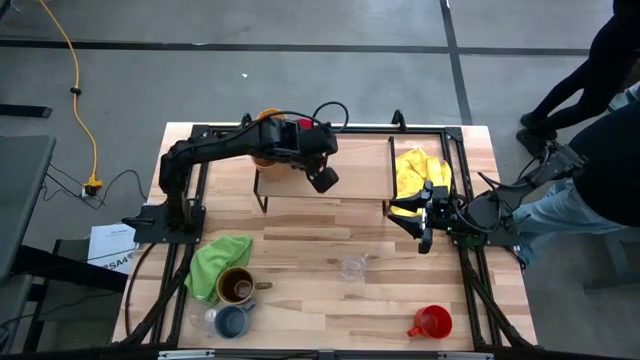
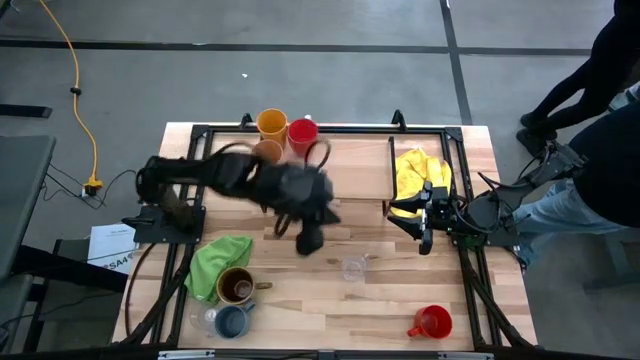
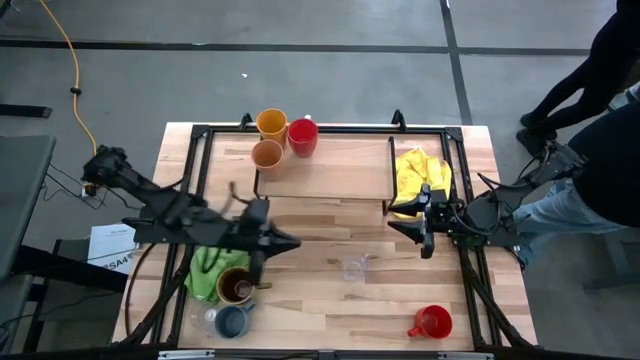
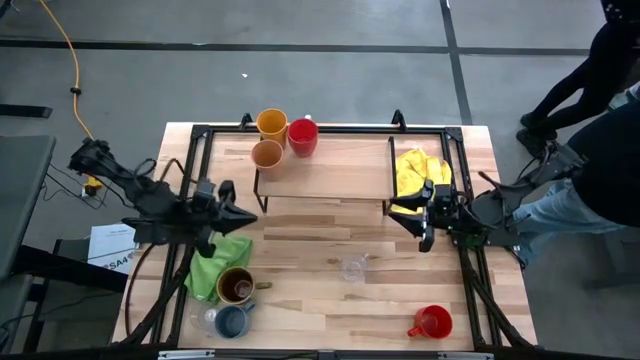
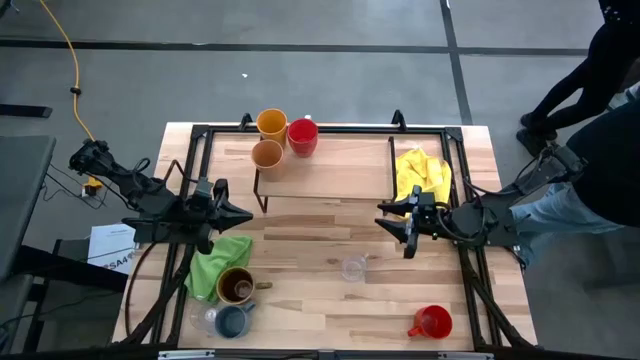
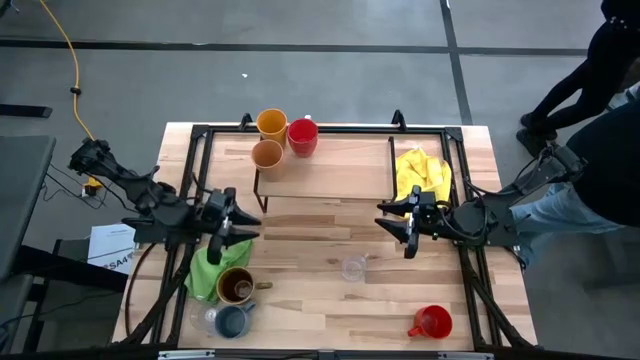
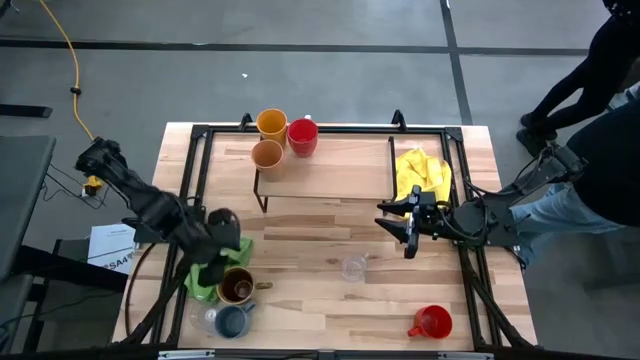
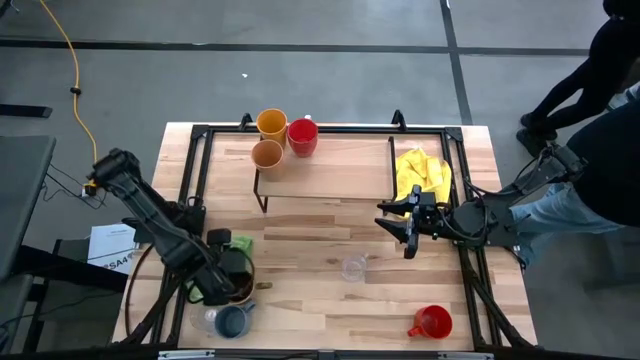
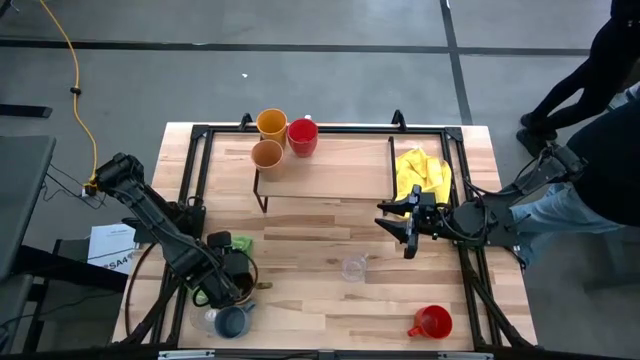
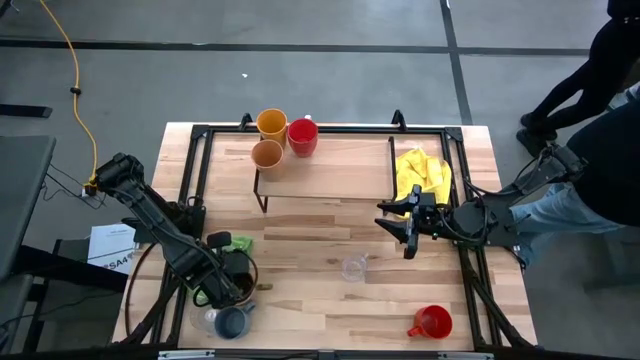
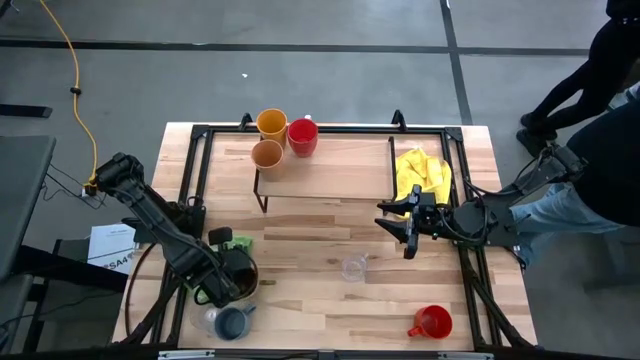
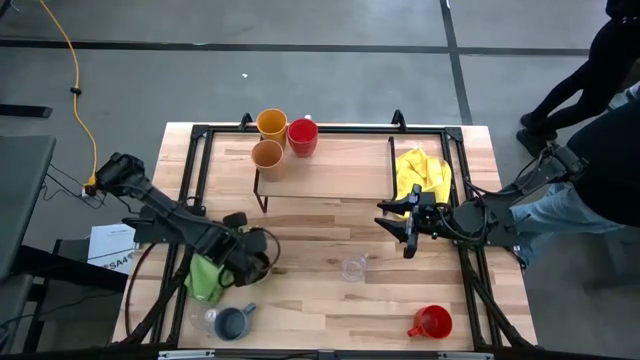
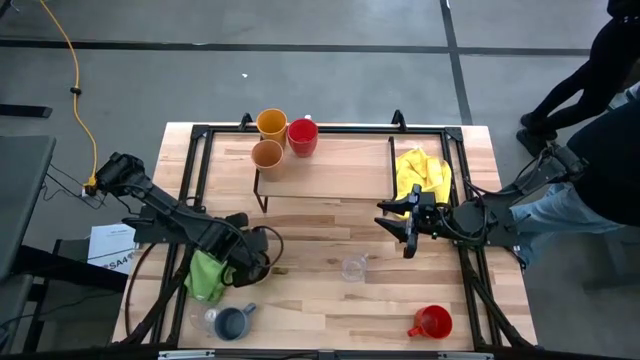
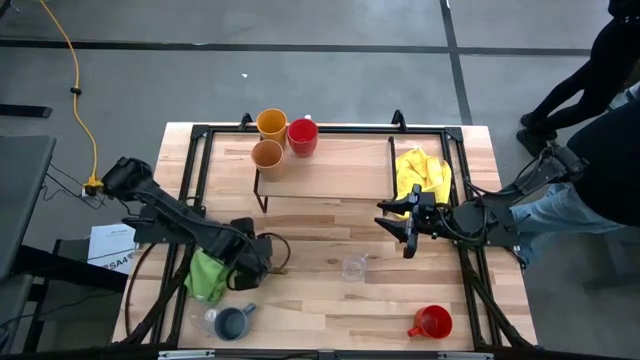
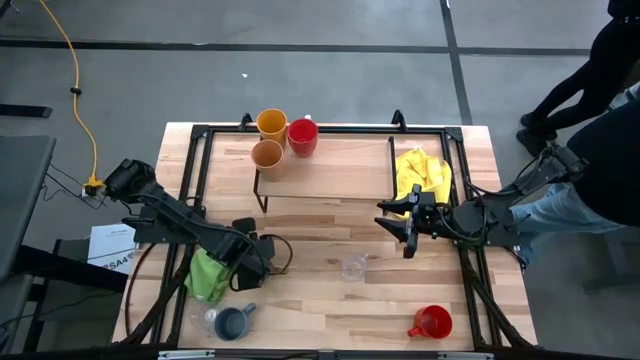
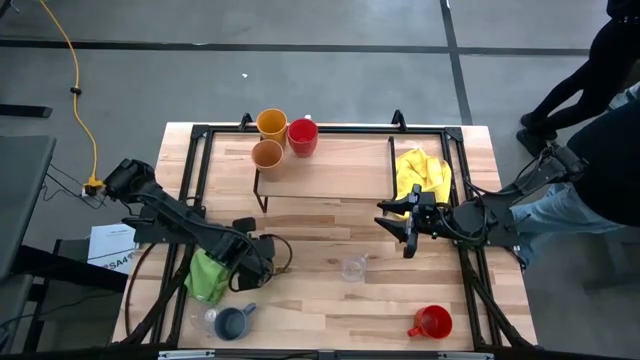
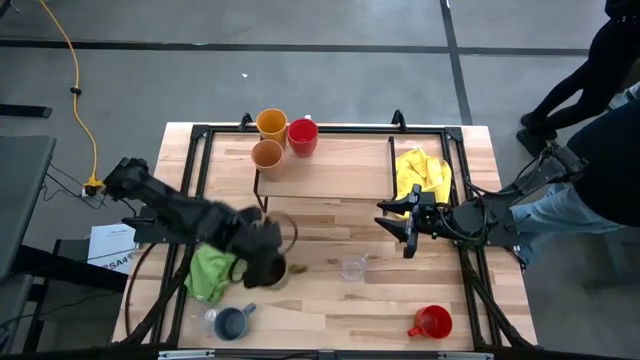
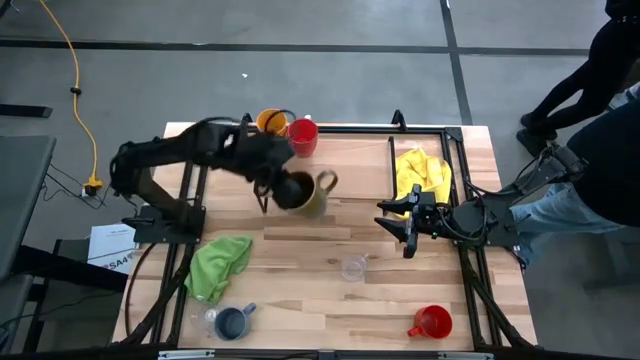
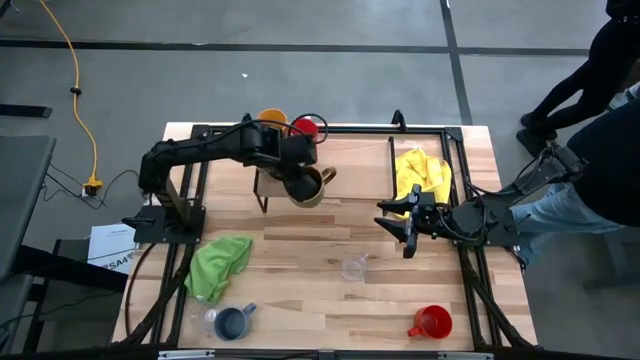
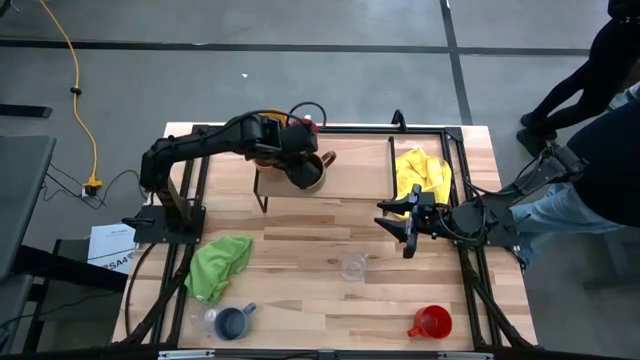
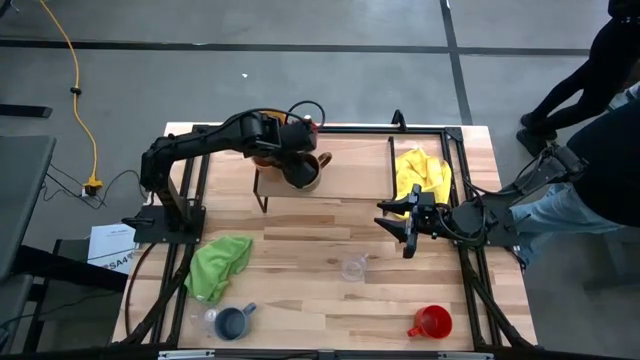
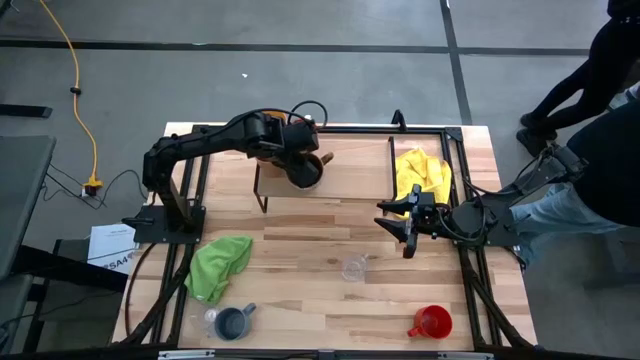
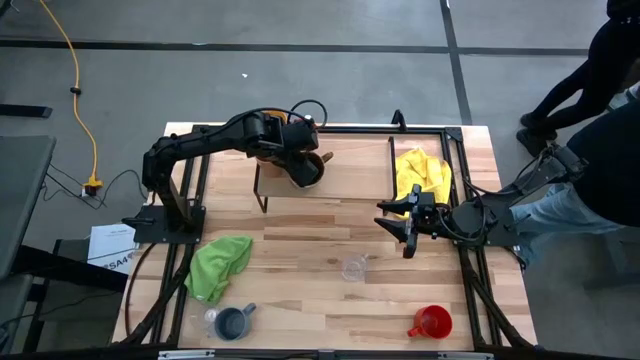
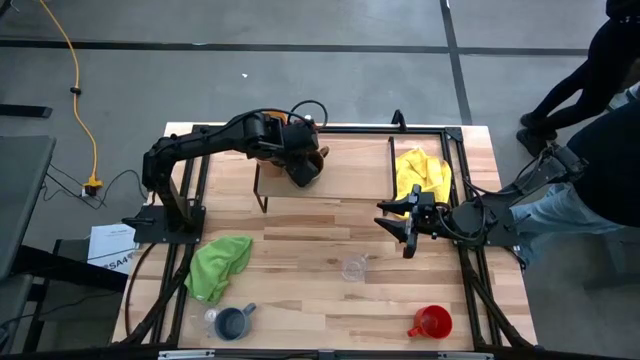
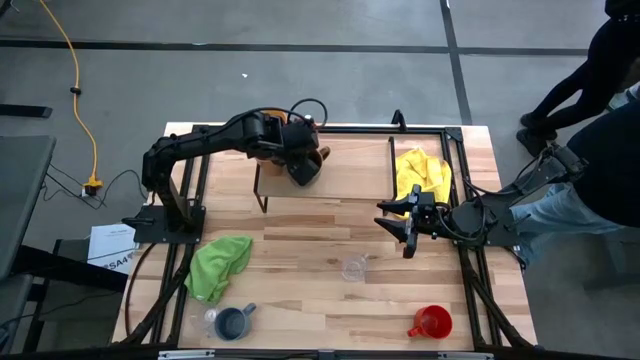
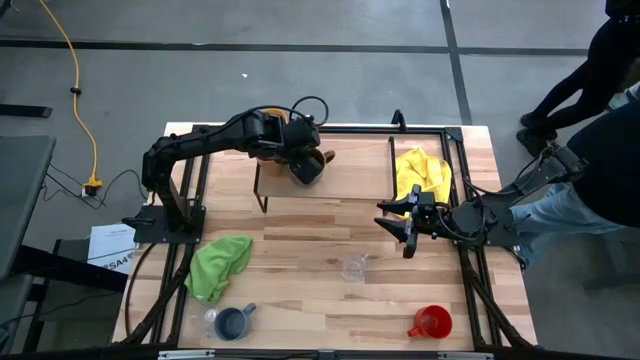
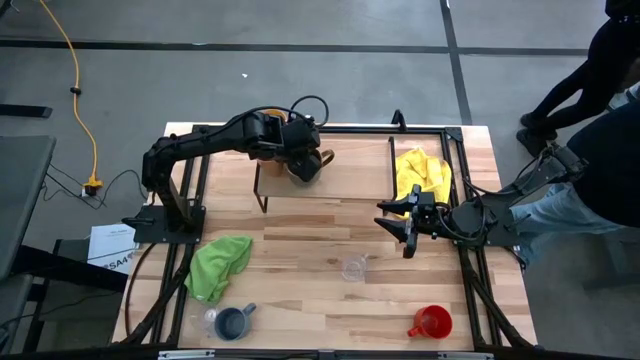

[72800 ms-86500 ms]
Task: Stack small to large cups/mugs on shelf
Put the brown and green mug on the shelf

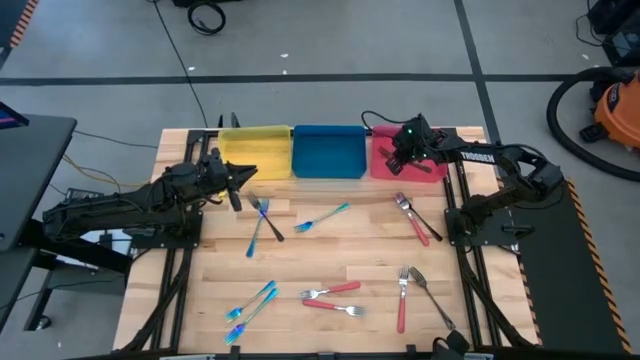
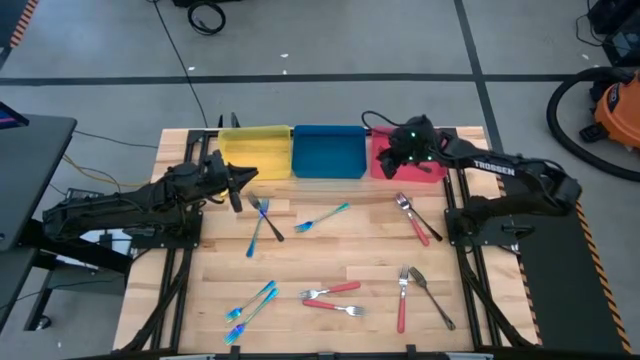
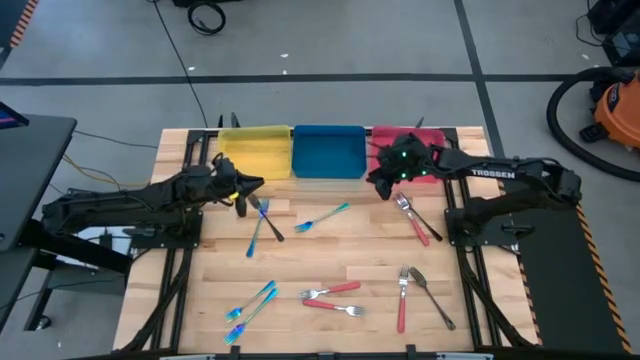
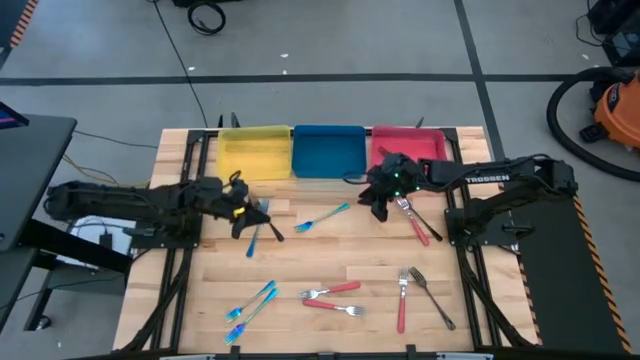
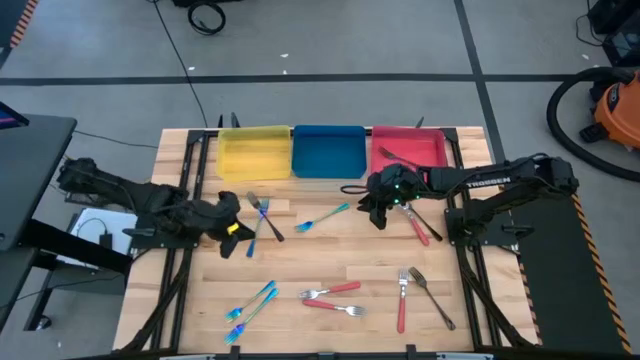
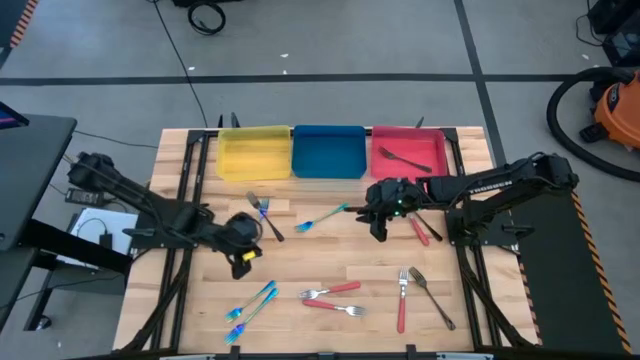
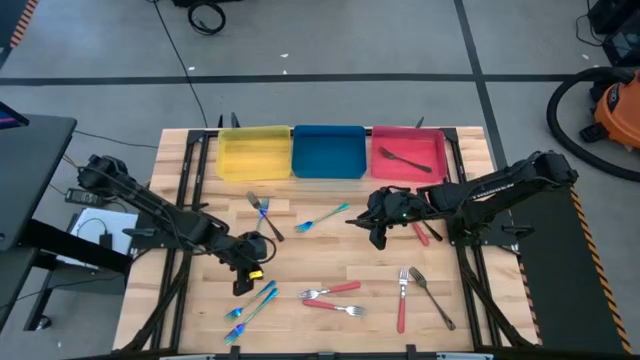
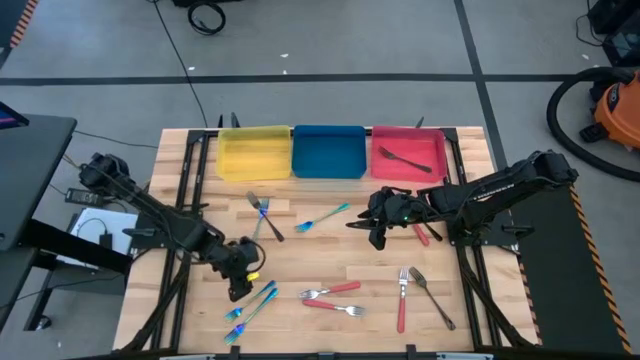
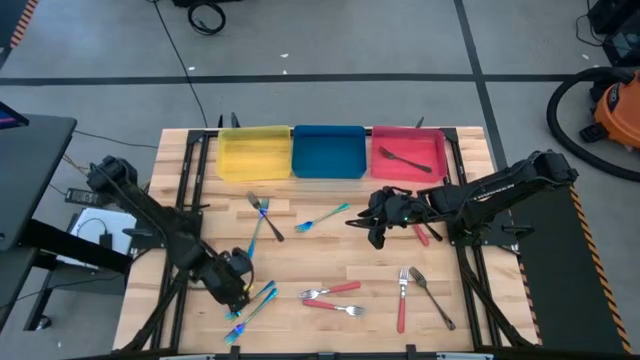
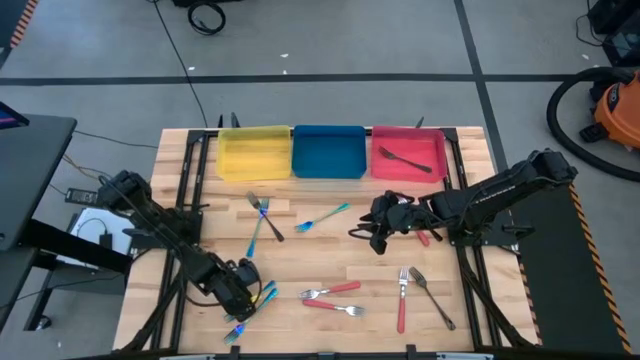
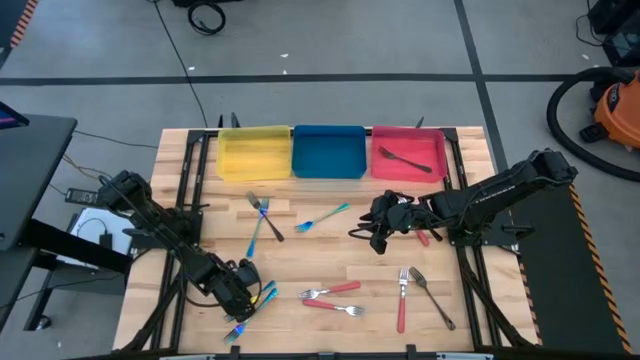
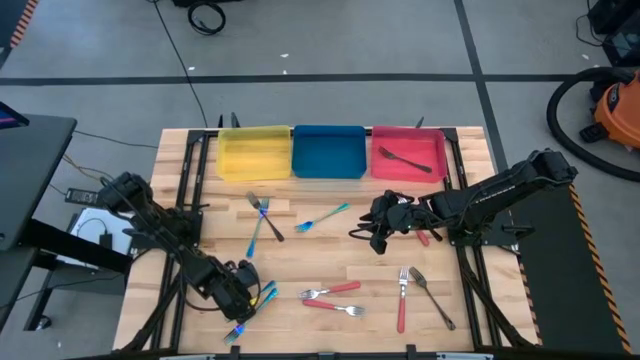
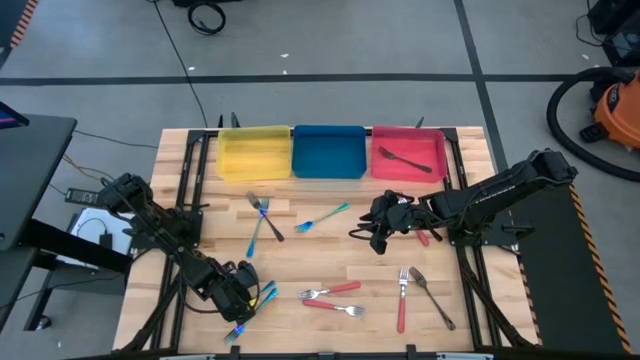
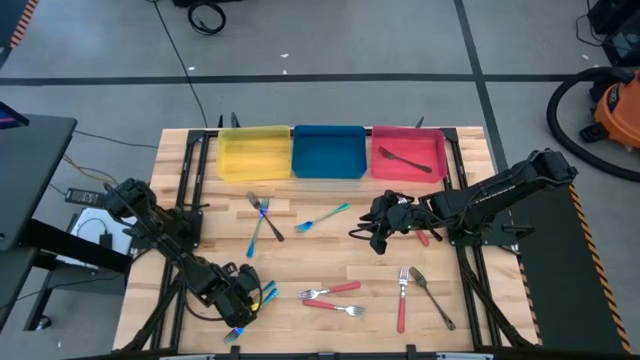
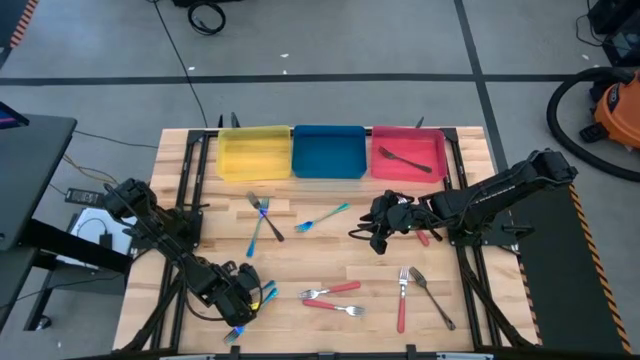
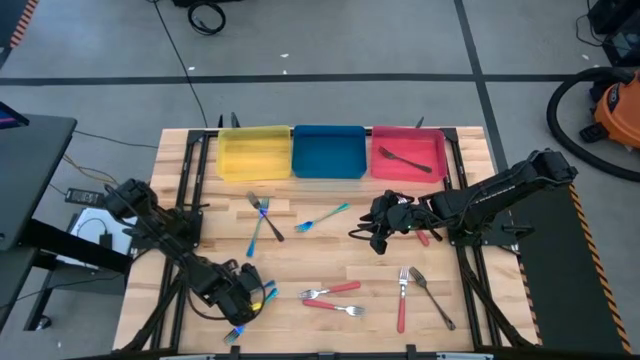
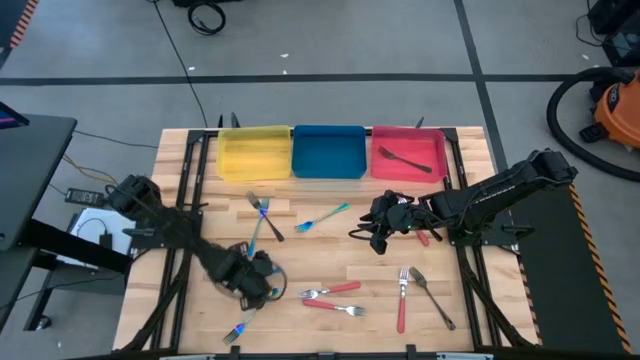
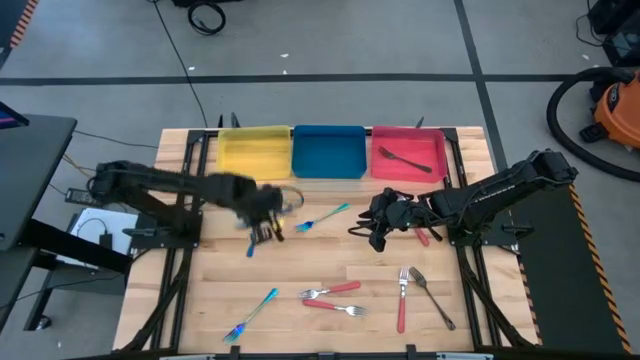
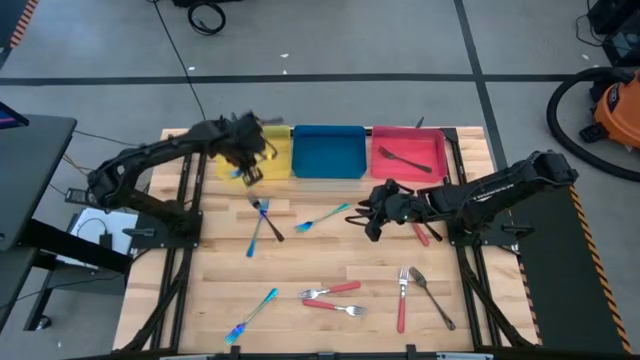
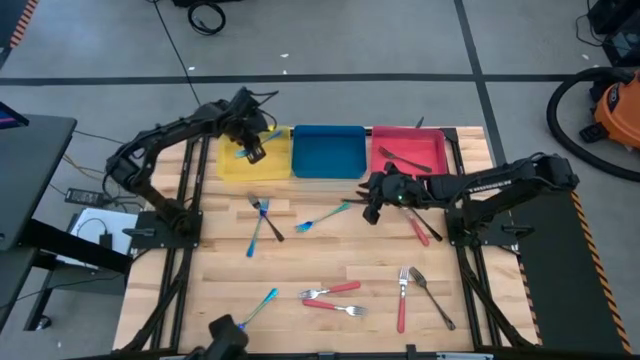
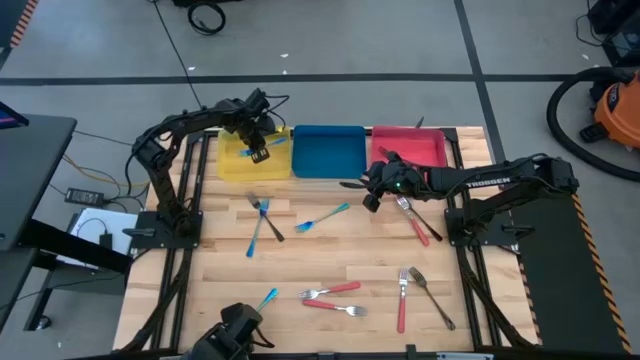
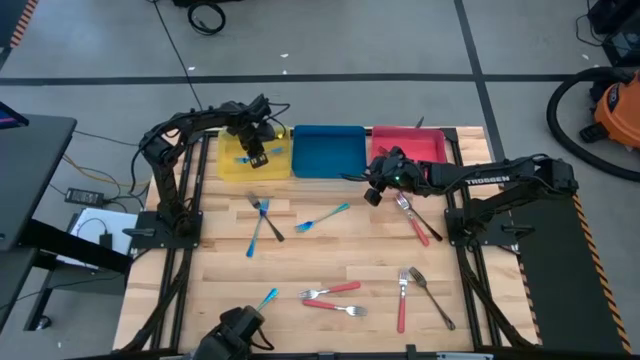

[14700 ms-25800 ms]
Task: Sort silverware by color (type)
Put the blue fork into the yellow bin
